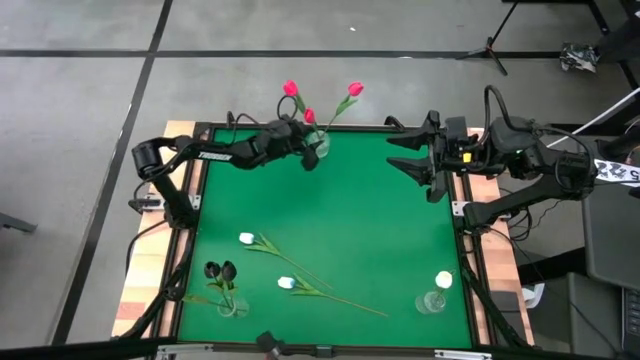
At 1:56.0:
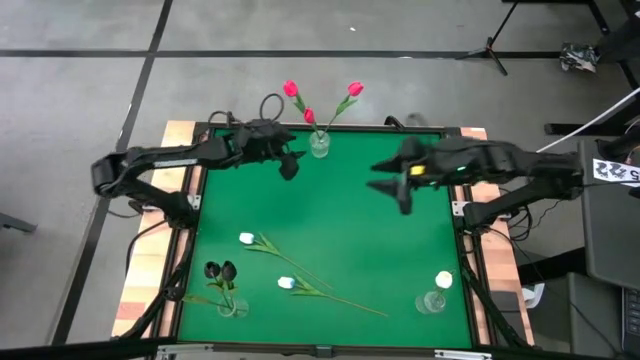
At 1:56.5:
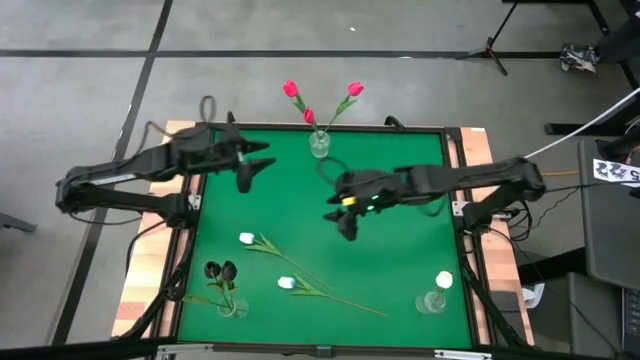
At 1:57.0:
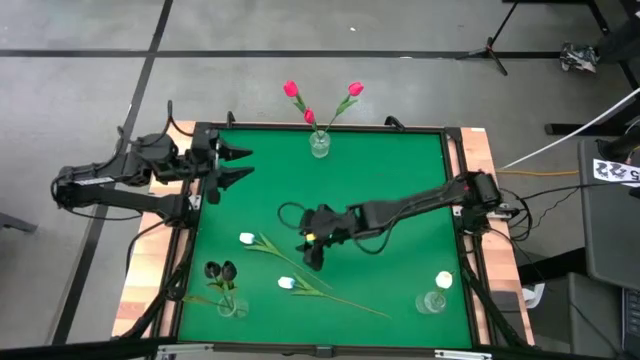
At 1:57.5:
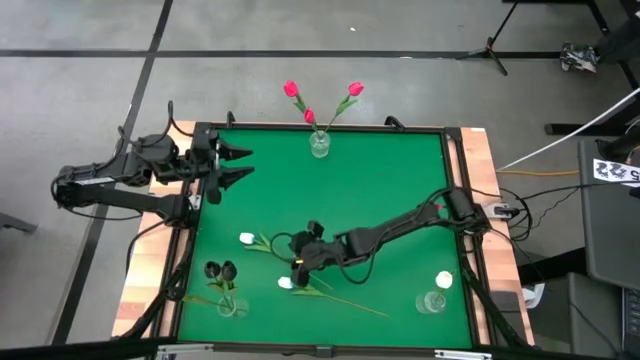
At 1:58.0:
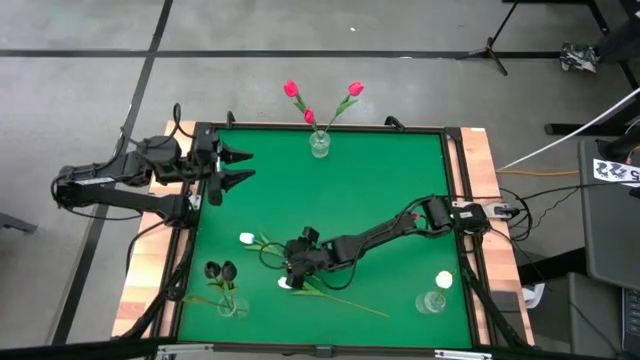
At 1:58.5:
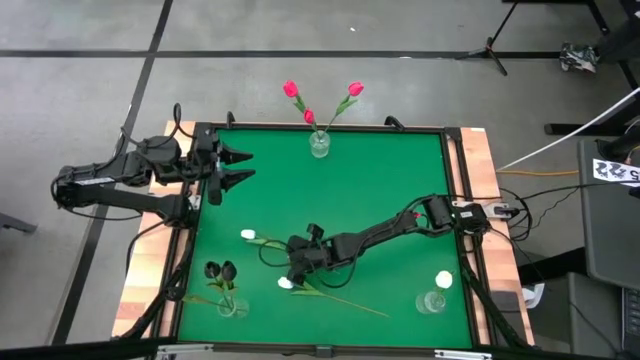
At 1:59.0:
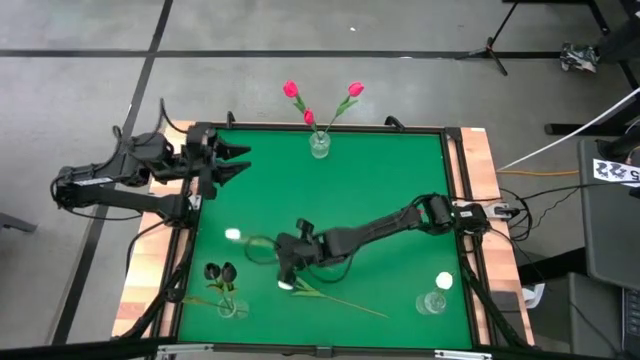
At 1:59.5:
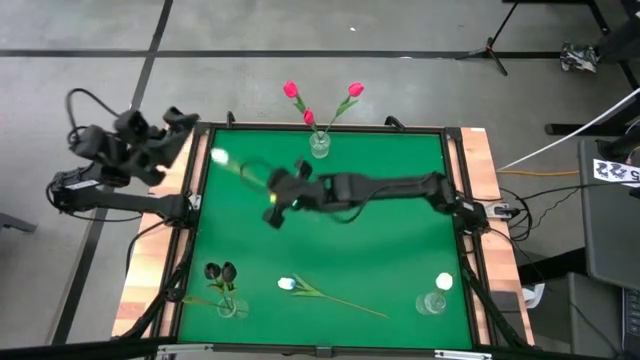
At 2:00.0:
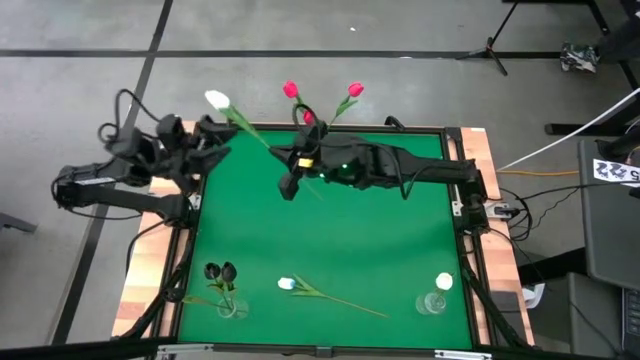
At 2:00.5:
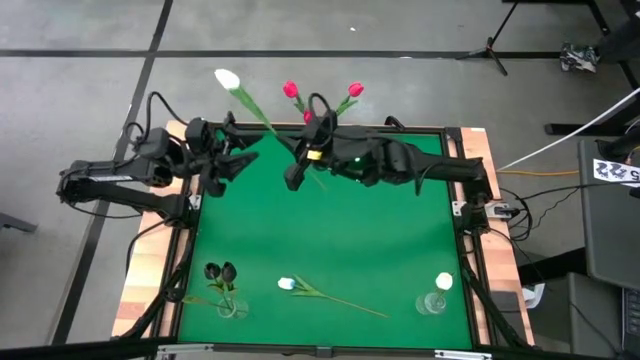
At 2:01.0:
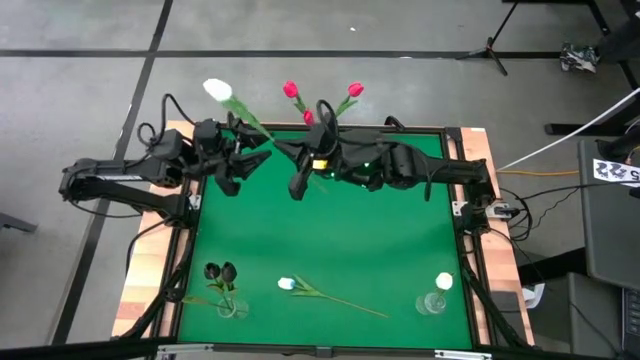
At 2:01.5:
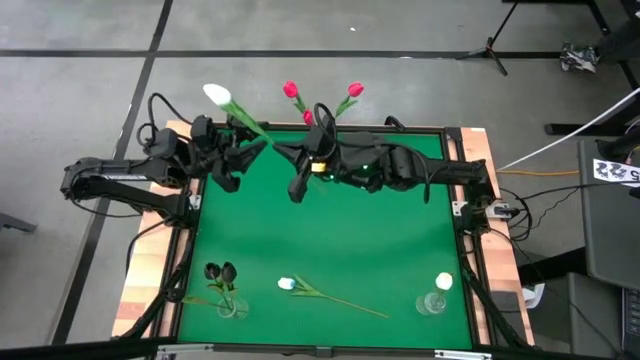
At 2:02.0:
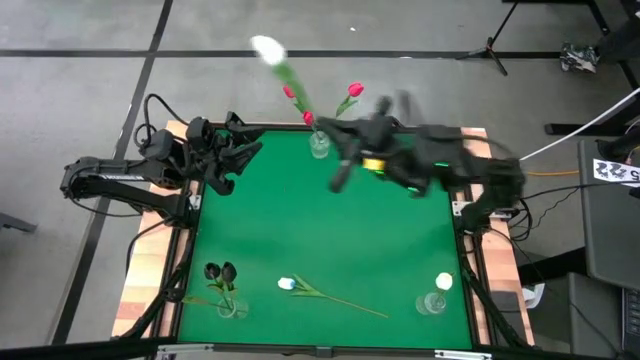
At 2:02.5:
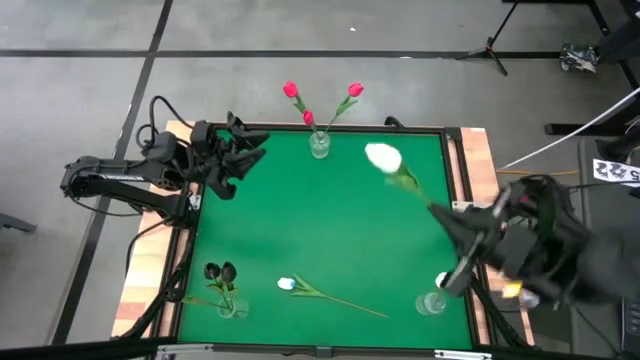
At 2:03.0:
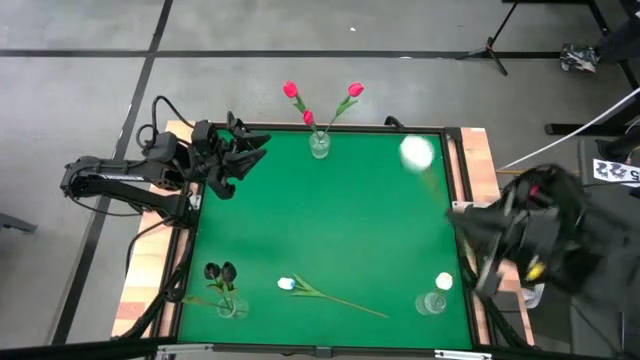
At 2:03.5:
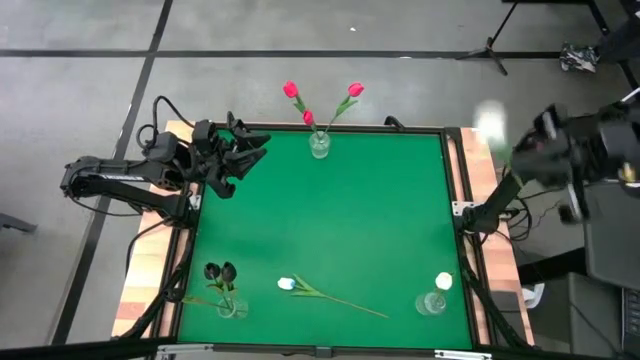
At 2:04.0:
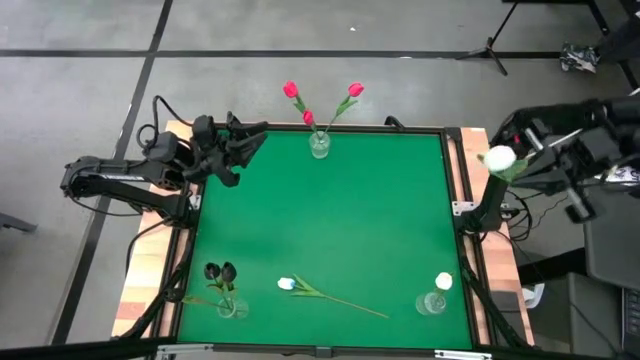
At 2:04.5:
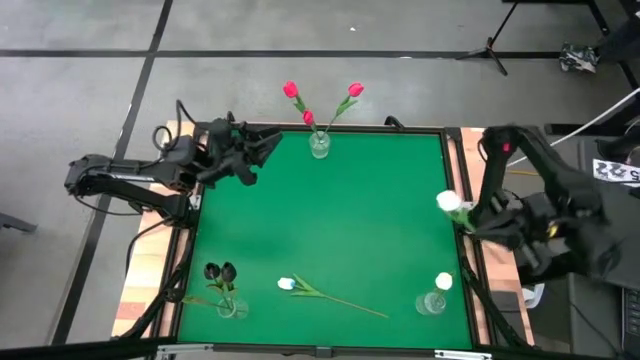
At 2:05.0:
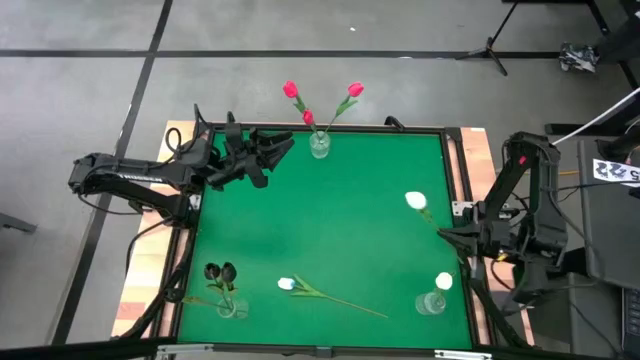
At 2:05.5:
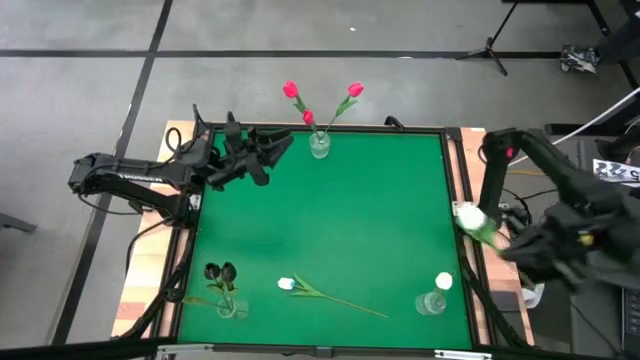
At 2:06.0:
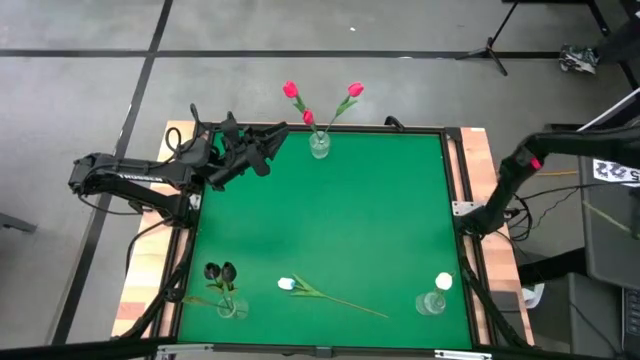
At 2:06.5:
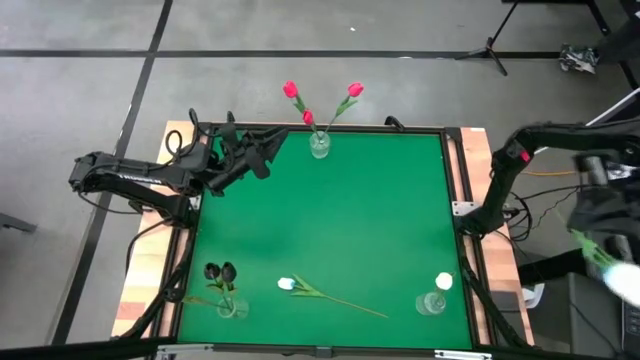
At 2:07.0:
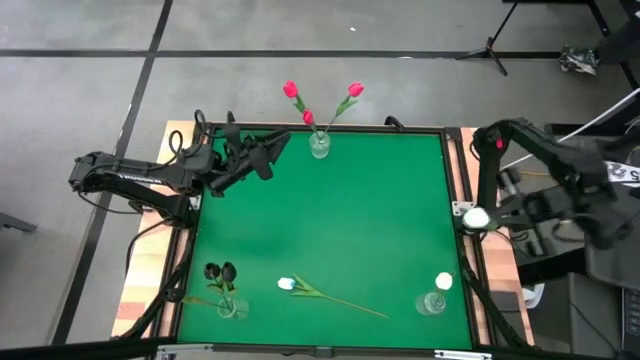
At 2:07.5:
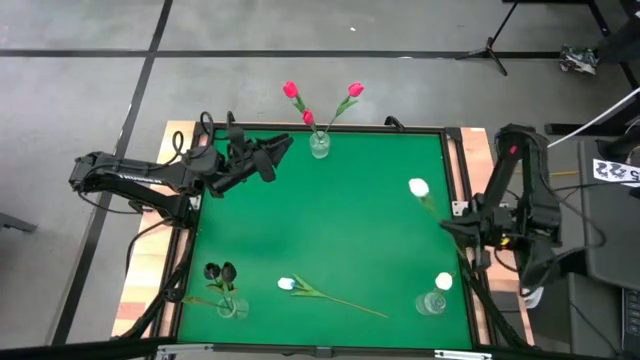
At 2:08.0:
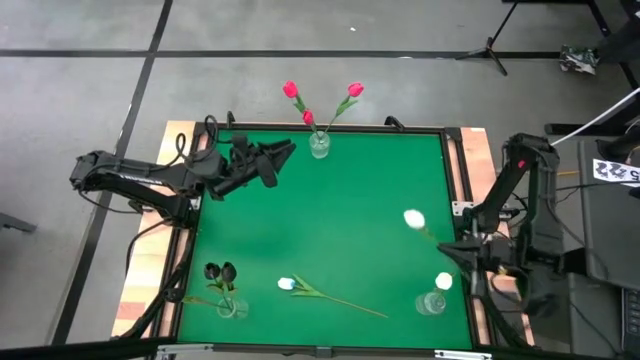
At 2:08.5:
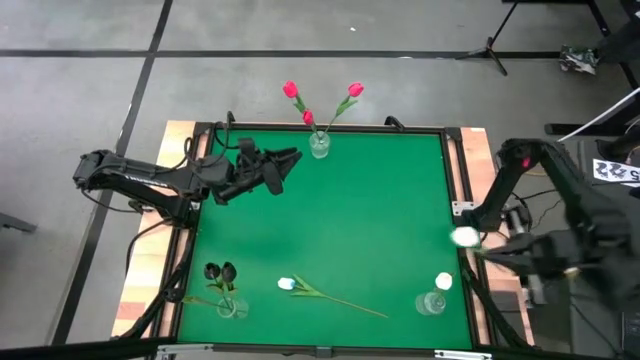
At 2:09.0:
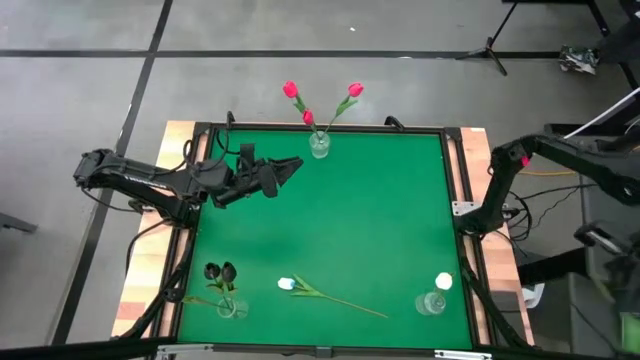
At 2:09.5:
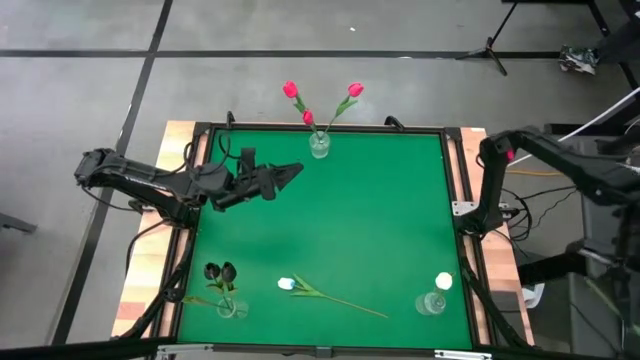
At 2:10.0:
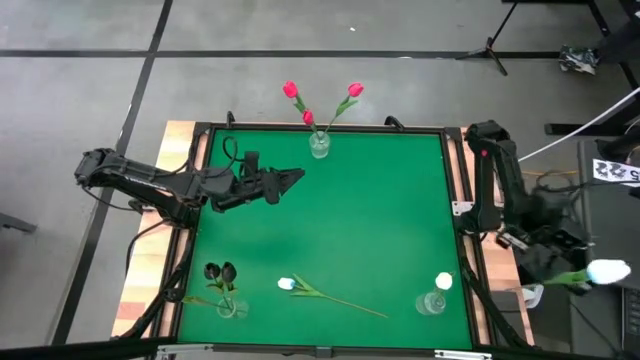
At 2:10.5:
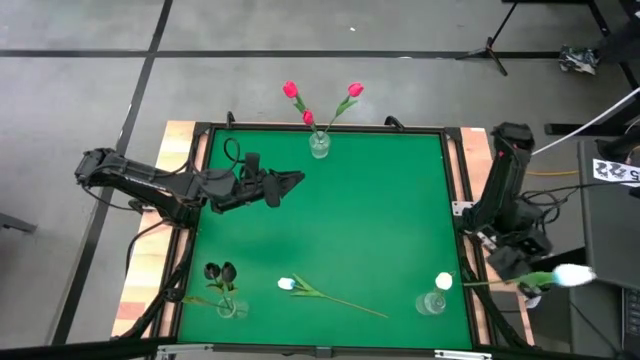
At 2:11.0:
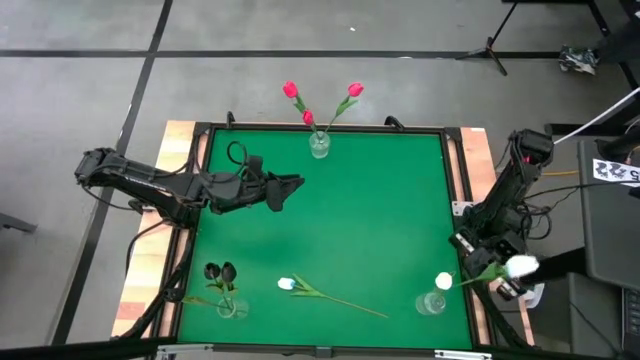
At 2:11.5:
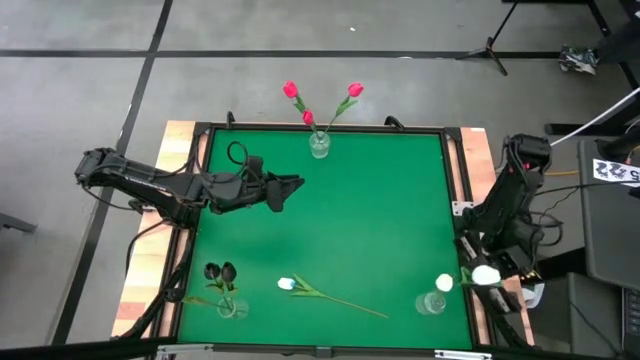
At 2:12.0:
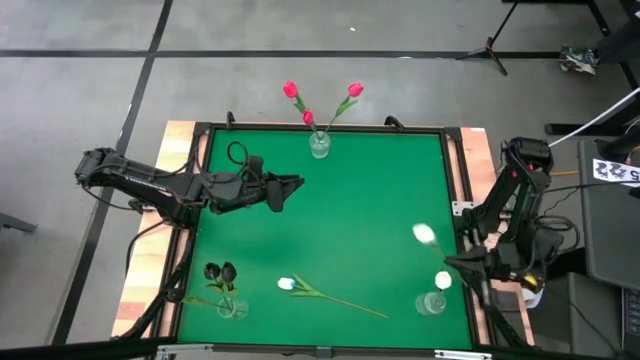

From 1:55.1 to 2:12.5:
Task: Sort flowers into vase by color
Put the top white flower into the bottom right transparent vase

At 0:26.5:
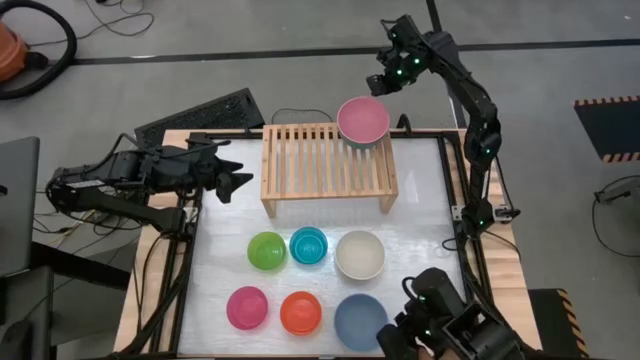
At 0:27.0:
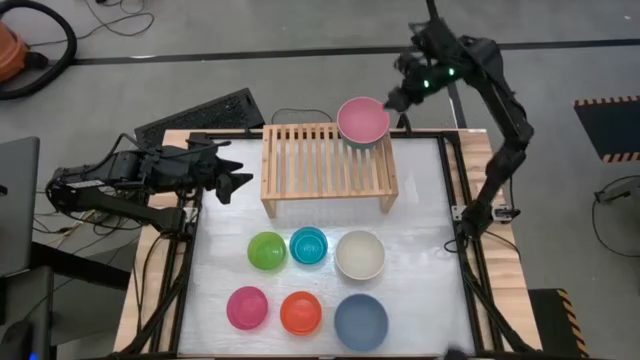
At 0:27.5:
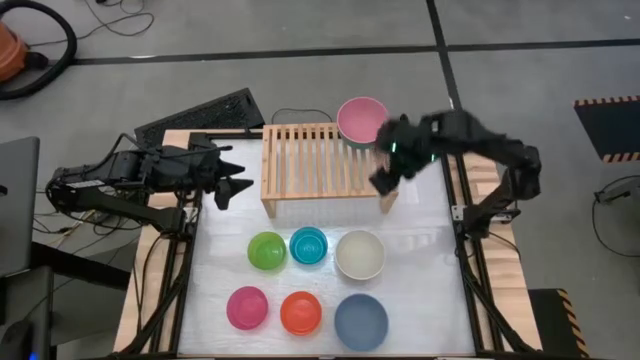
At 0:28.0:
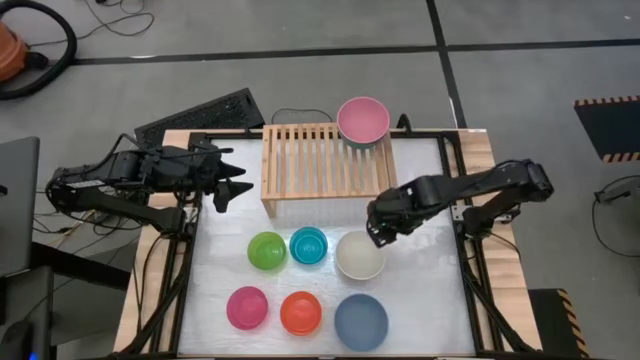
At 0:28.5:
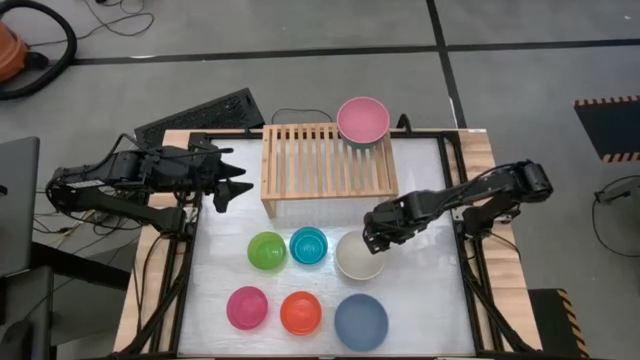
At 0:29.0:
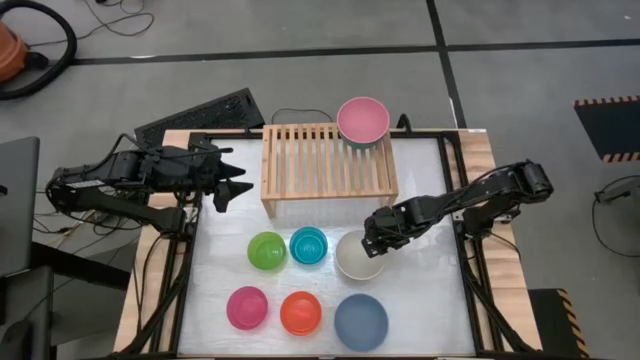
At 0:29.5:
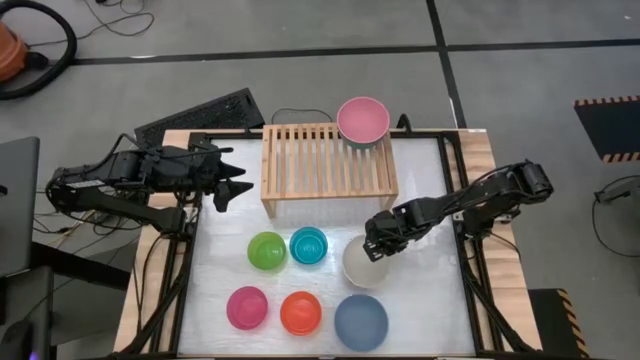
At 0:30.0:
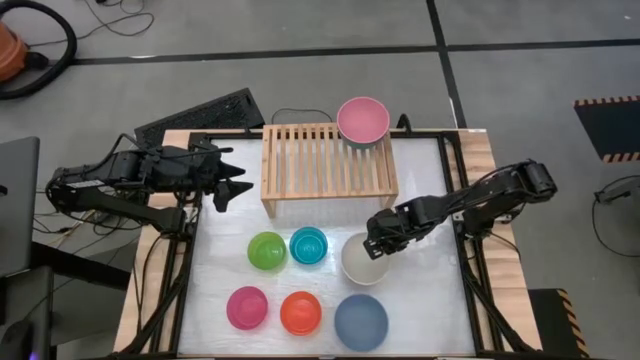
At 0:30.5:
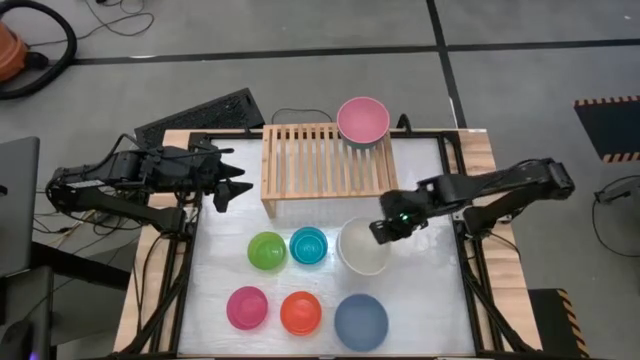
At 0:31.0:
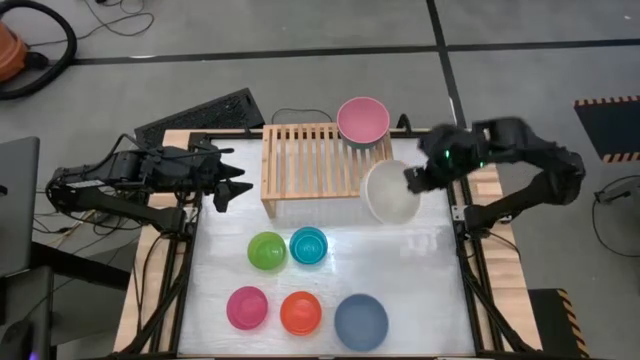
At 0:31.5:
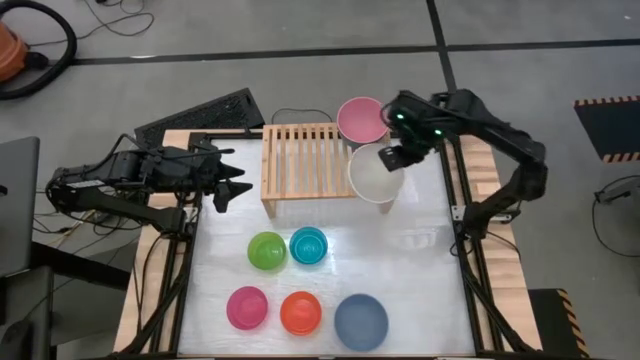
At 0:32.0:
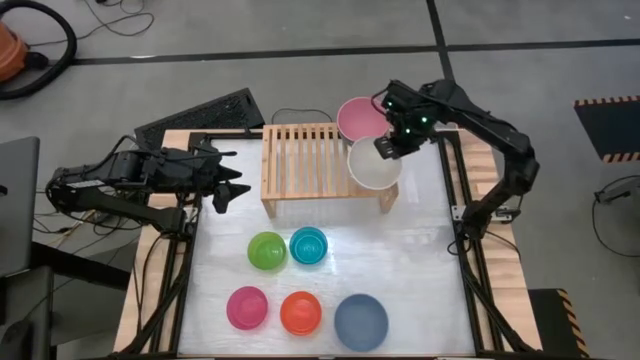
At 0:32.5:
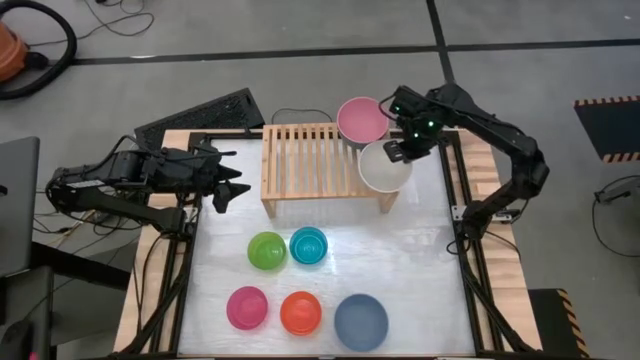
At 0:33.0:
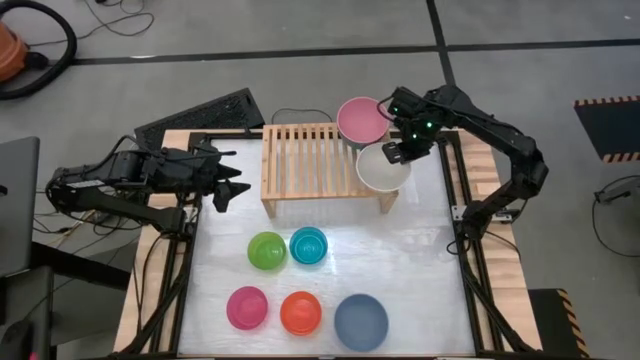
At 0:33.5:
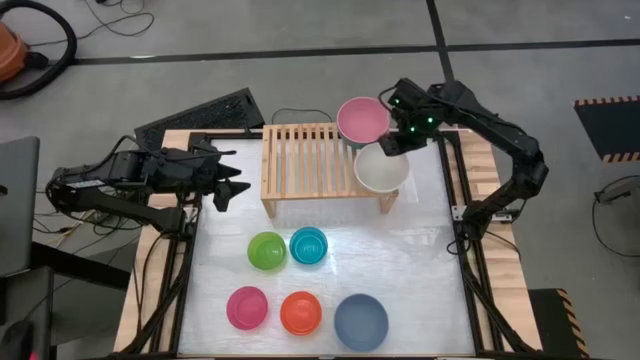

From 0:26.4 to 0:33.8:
Task: Place and stack bowls onto a shelf
Put the large white bowl on the shelf
